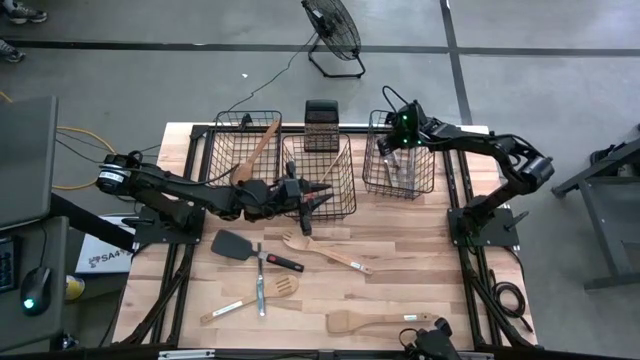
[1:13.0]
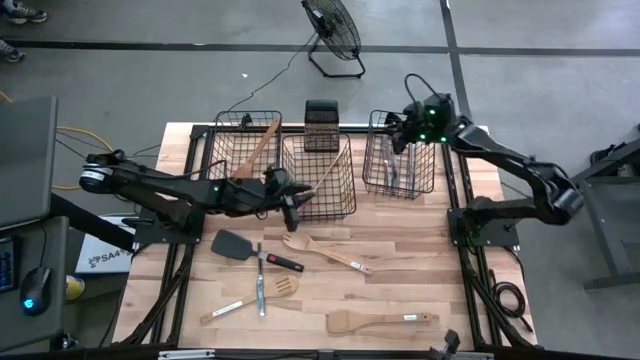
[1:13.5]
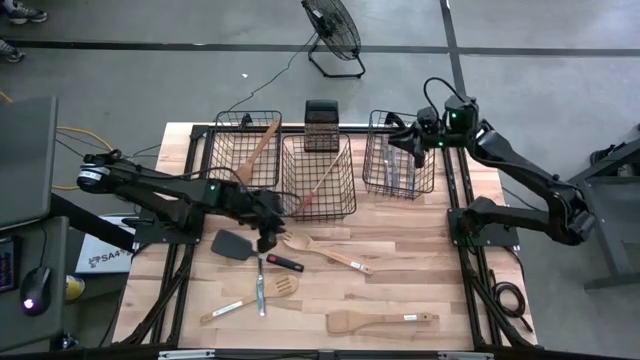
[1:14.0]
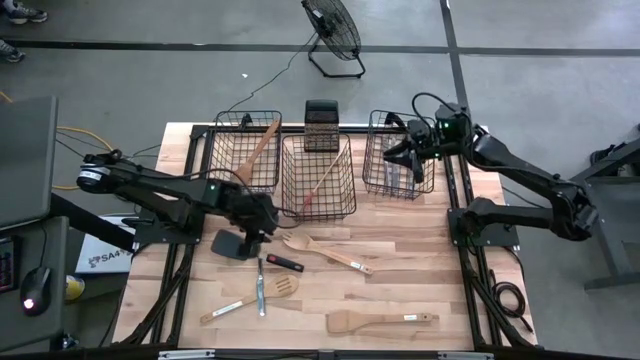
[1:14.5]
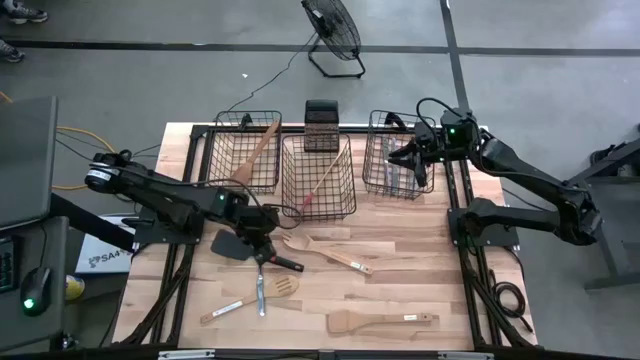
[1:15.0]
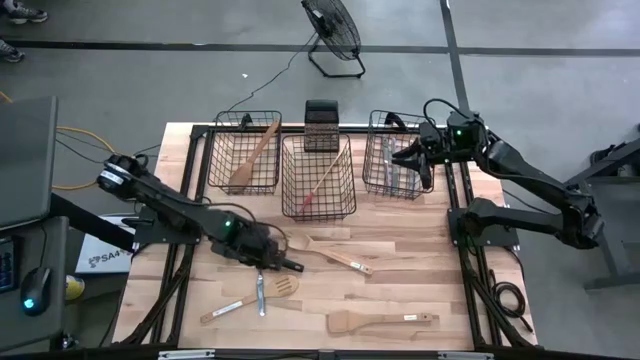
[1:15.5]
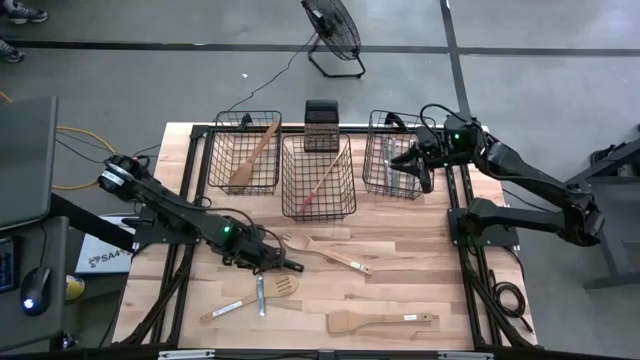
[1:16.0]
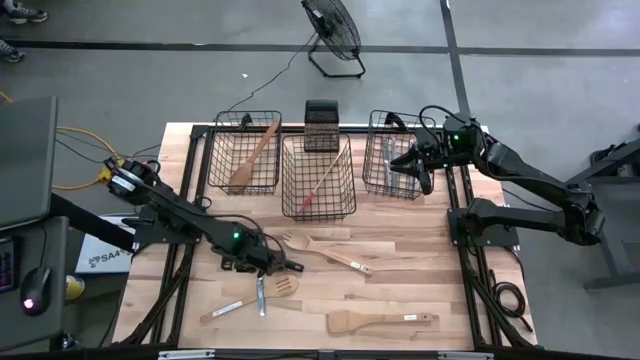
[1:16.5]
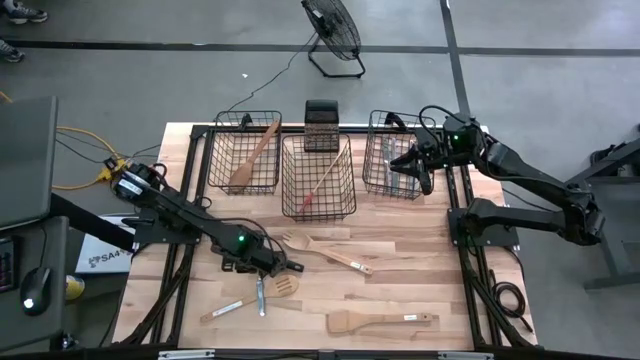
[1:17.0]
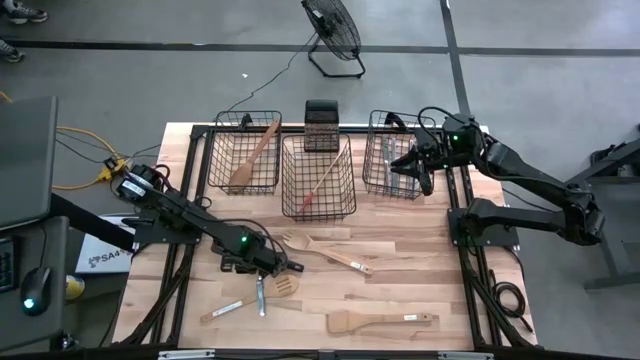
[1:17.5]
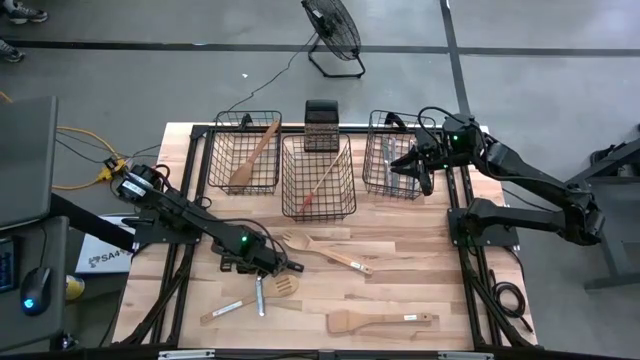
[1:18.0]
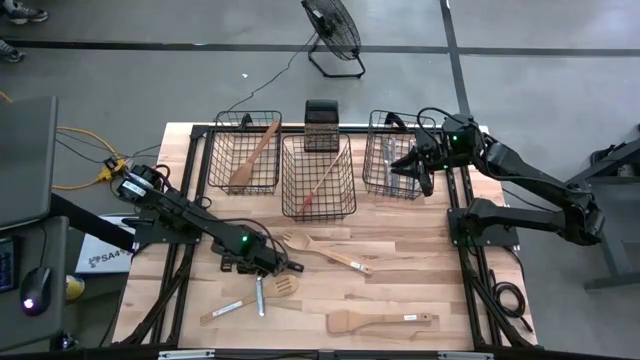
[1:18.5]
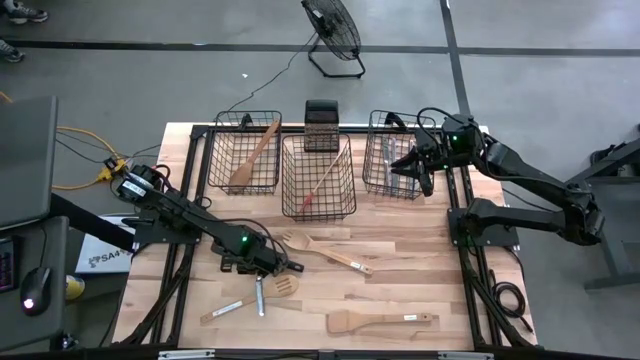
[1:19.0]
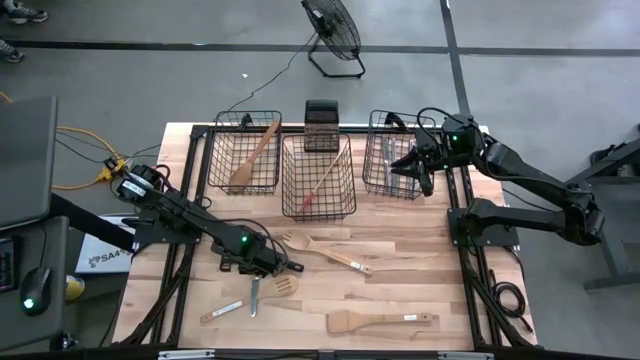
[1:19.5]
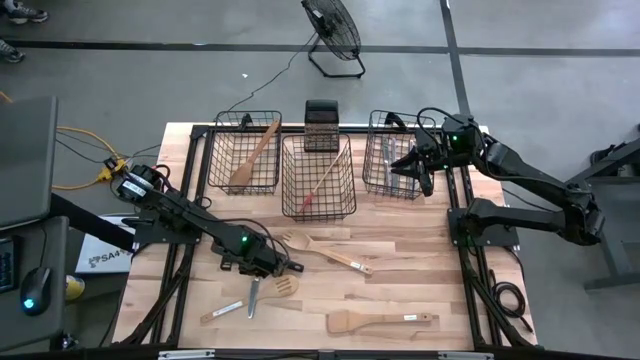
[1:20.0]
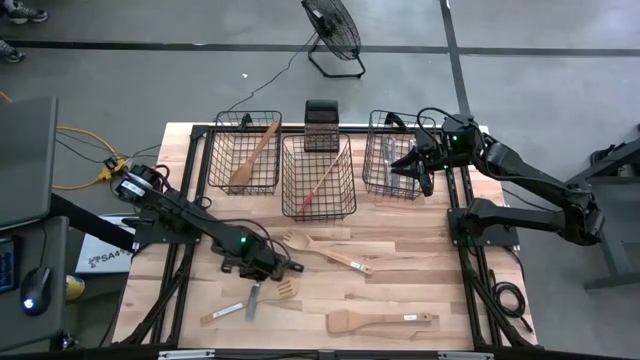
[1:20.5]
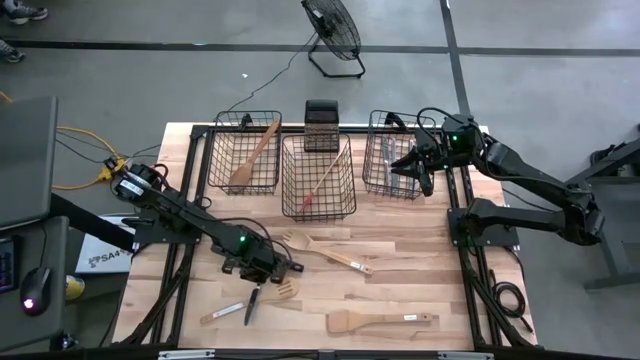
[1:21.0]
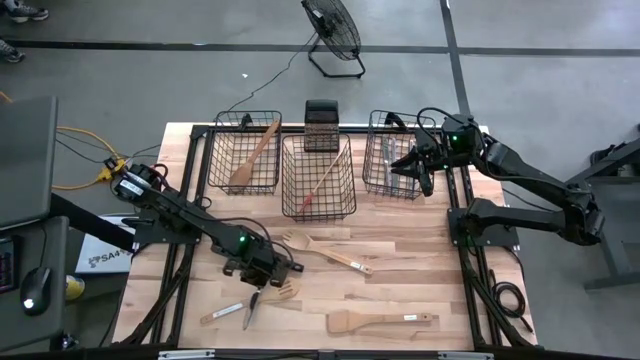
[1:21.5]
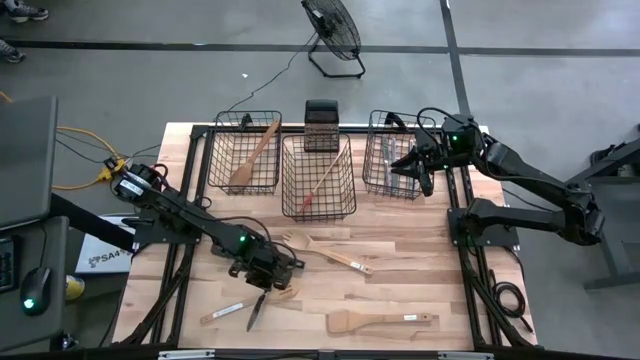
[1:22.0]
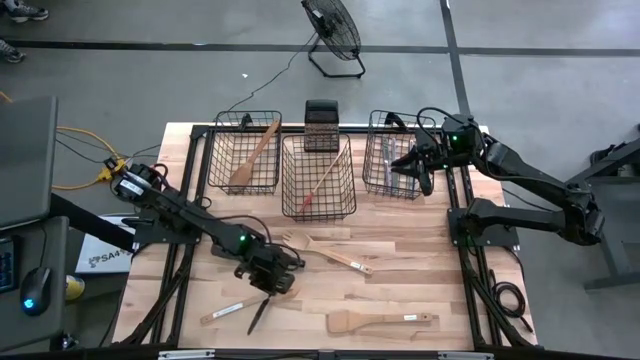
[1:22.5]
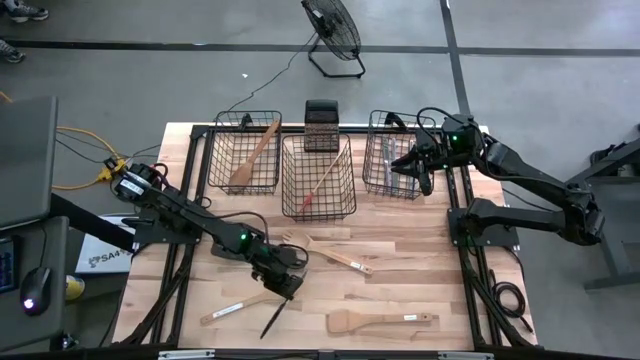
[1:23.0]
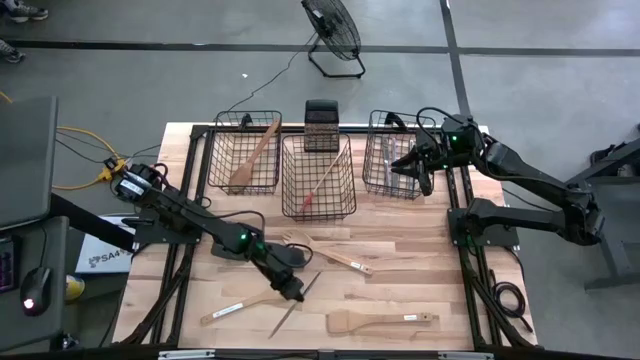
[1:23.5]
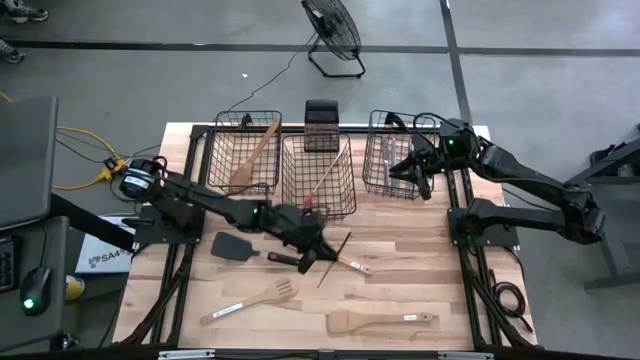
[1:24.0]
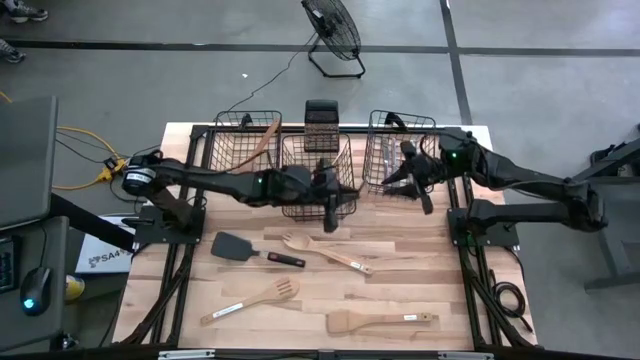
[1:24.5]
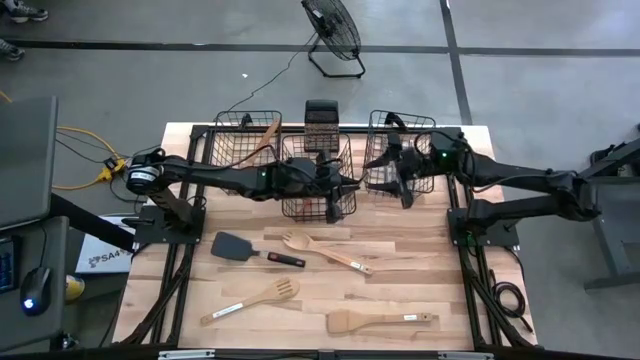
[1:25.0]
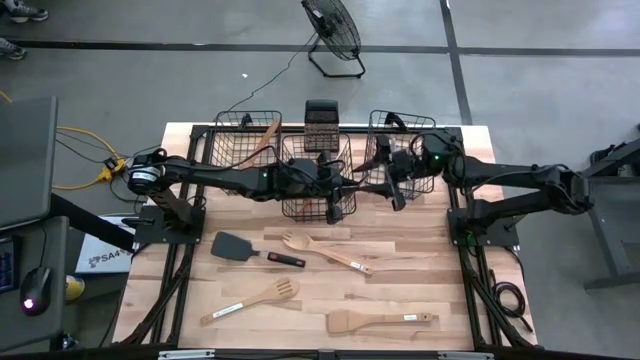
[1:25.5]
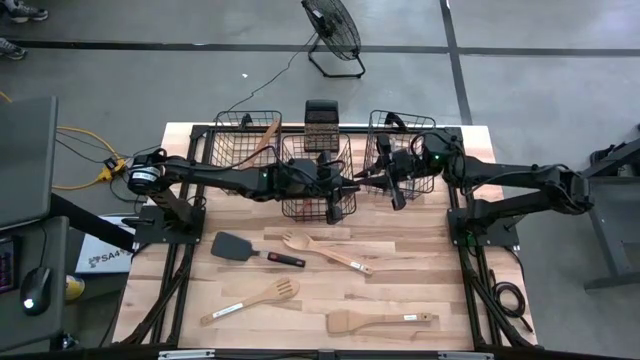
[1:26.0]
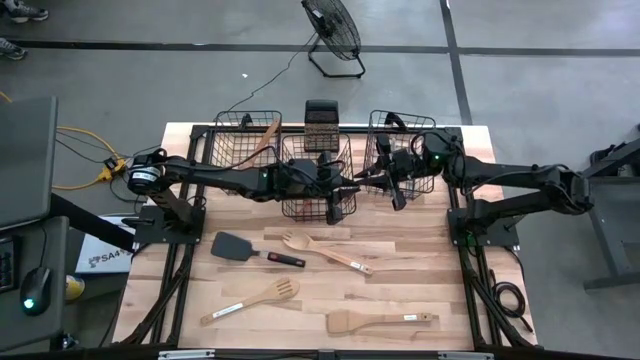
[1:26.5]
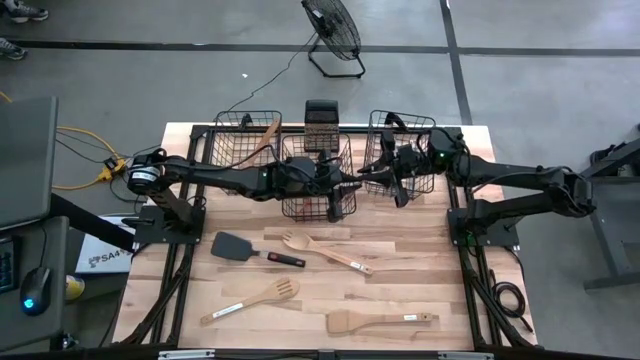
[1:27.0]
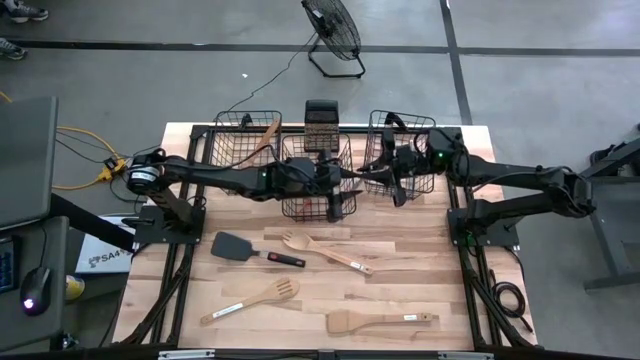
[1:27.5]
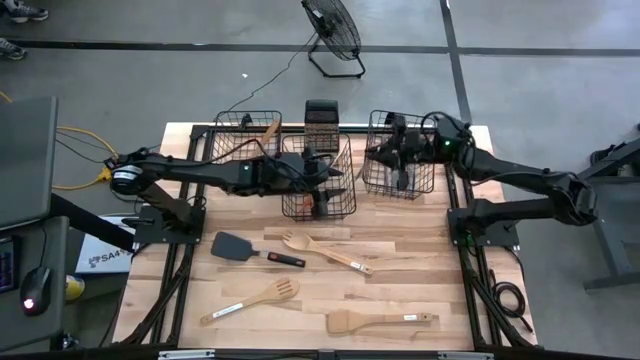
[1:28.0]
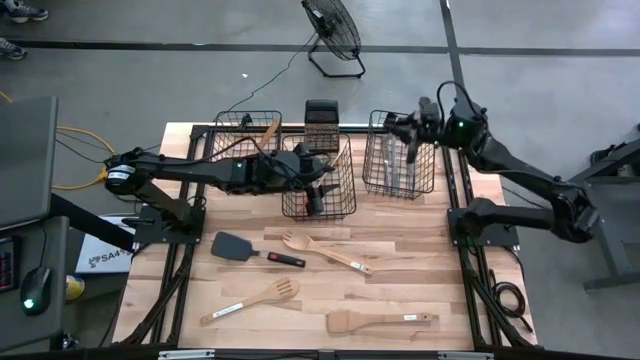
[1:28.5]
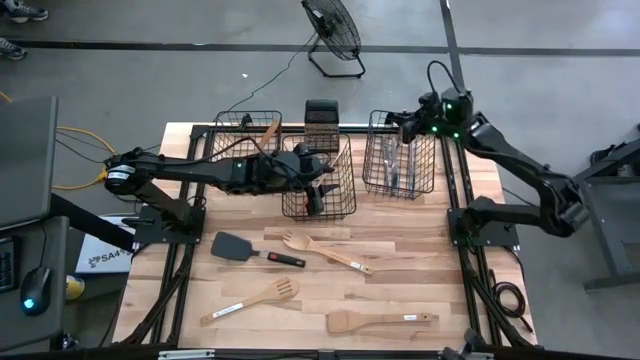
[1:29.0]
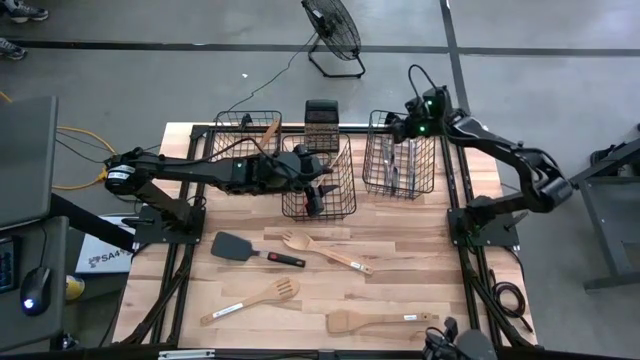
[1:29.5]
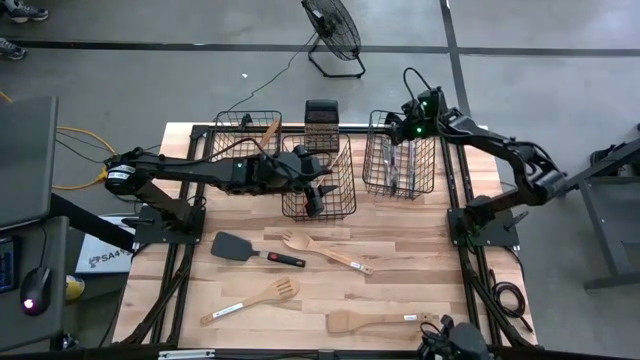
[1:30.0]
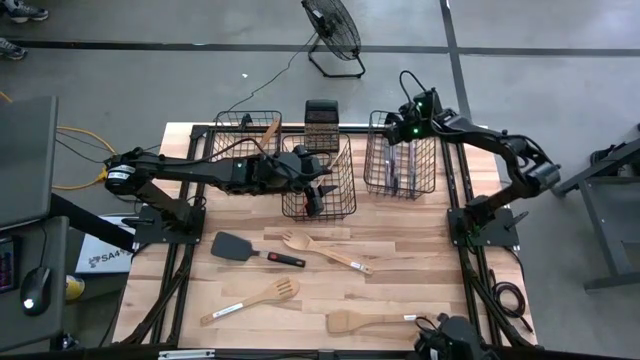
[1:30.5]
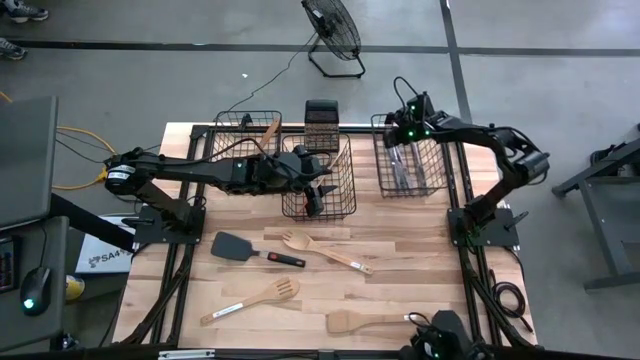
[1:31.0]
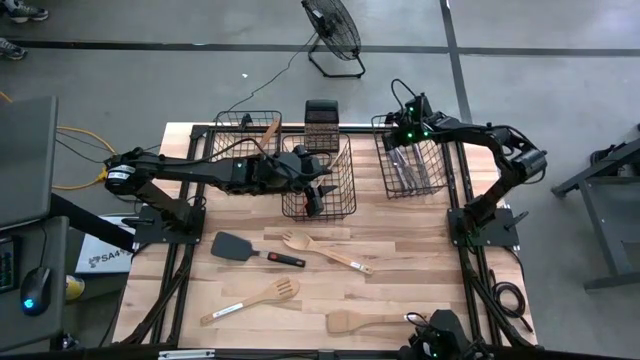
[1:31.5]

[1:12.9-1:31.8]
Task: Pick & Place Kitchen Items
Put the silver table knife into the right wire basket

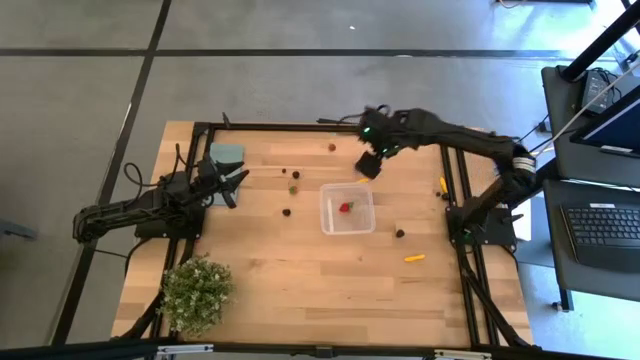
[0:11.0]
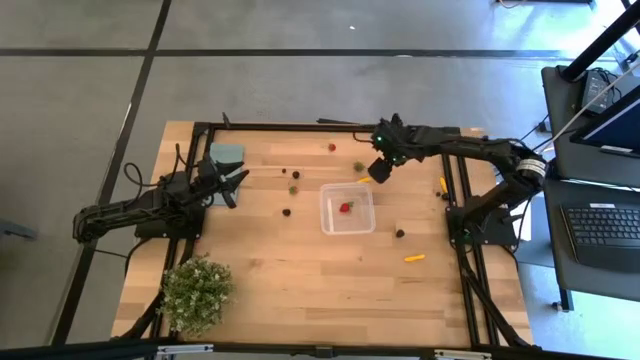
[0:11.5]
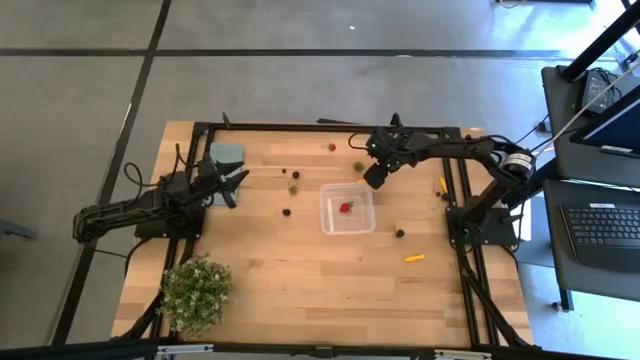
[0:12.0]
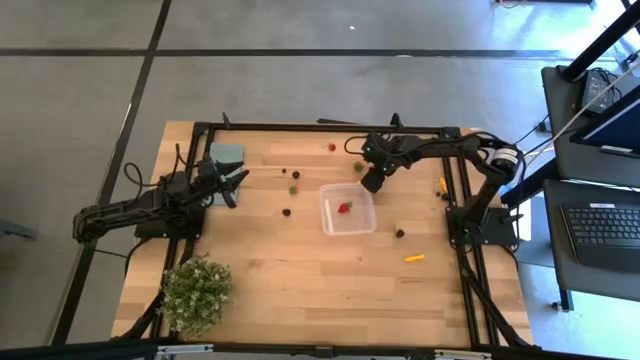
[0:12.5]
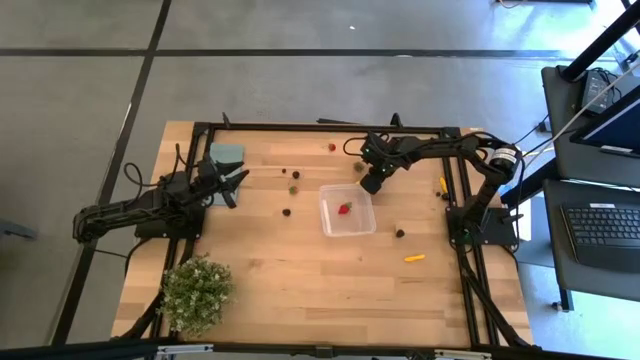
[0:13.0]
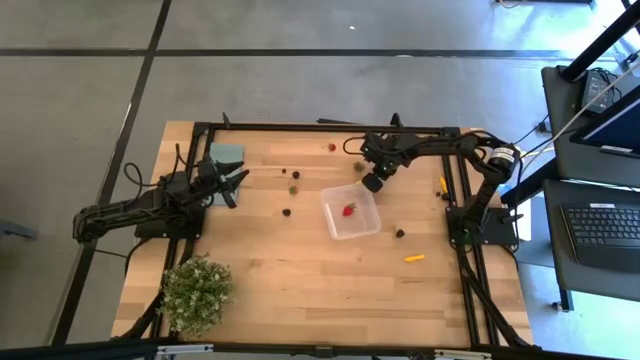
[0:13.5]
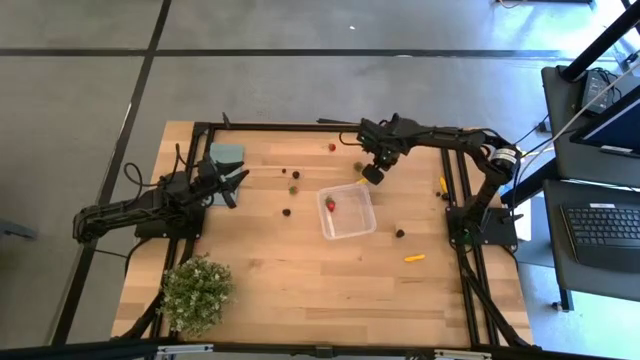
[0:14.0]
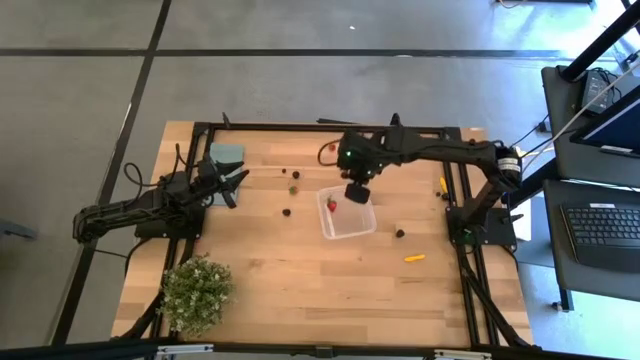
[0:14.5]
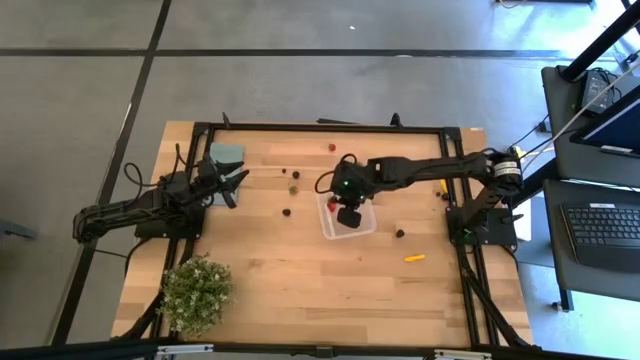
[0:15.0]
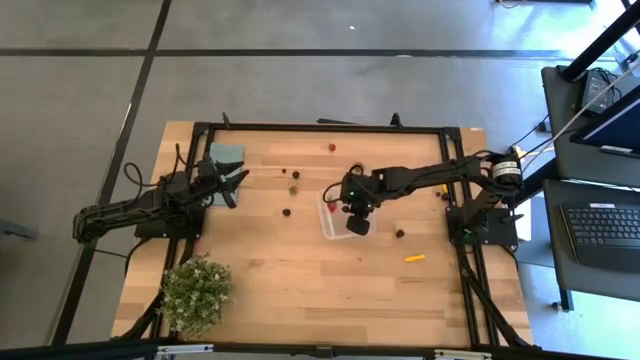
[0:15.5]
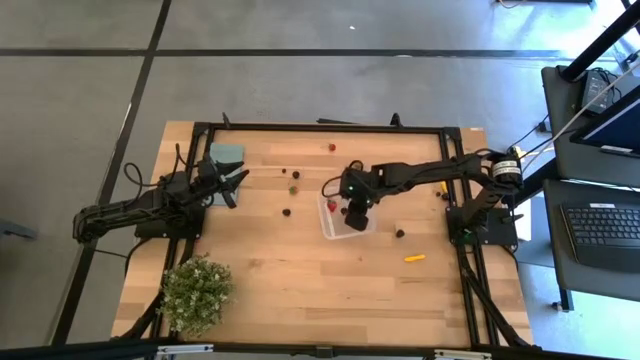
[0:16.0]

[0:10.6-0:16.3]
Task: Pick and placing Produce into tupperware
Put the top cherry into the transparent bin
